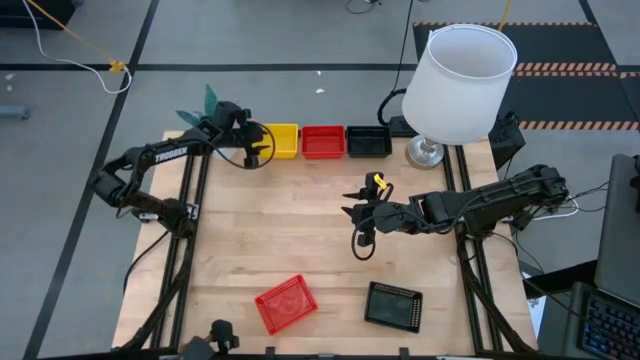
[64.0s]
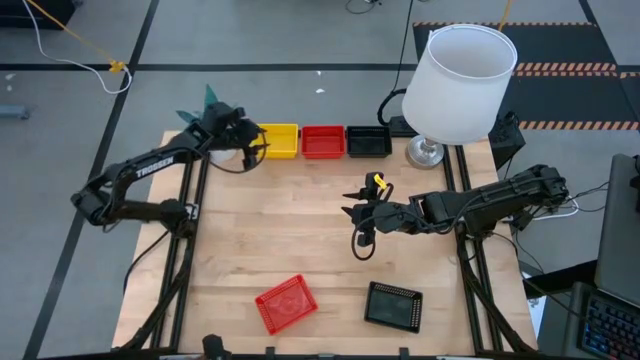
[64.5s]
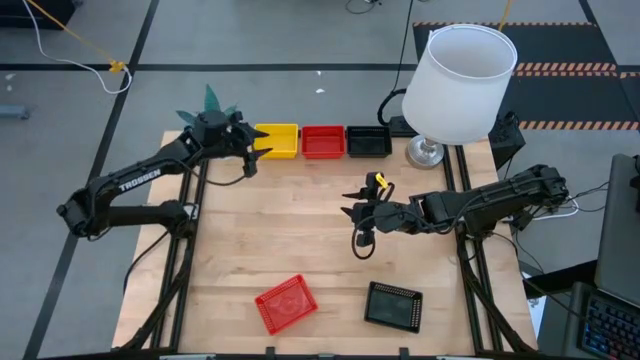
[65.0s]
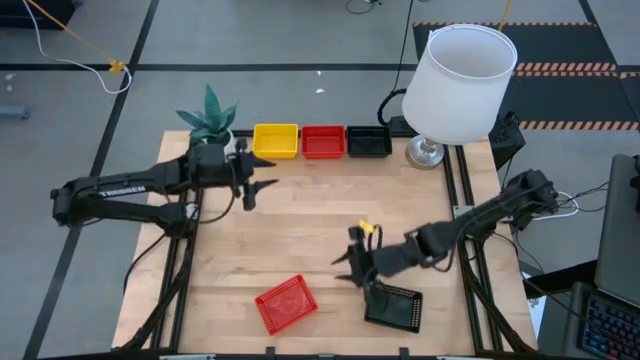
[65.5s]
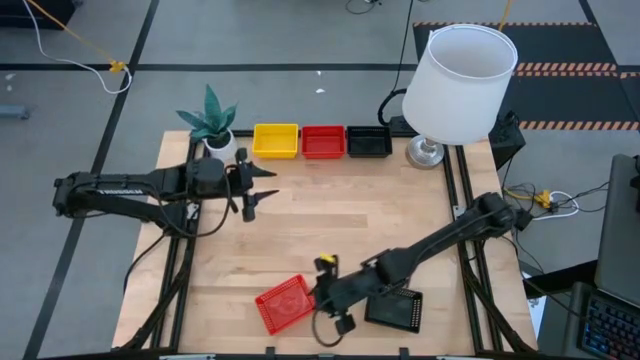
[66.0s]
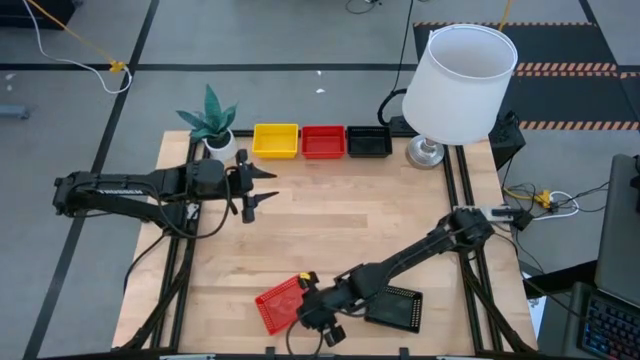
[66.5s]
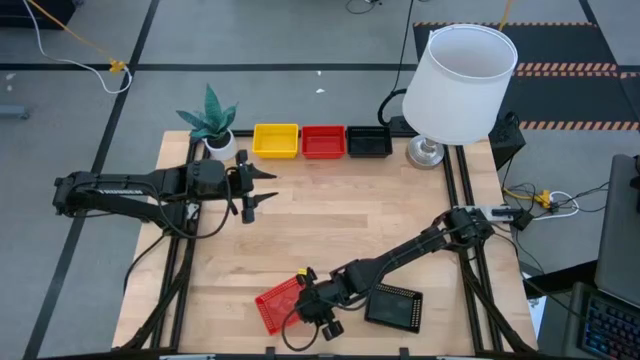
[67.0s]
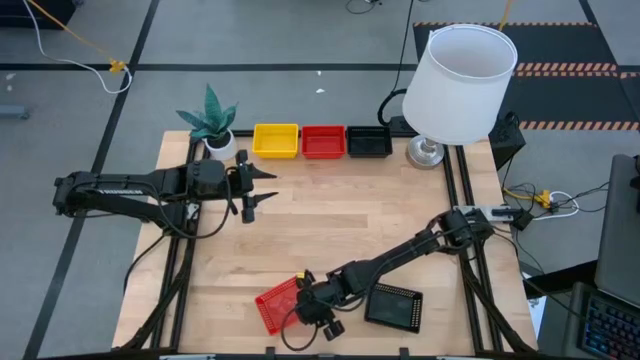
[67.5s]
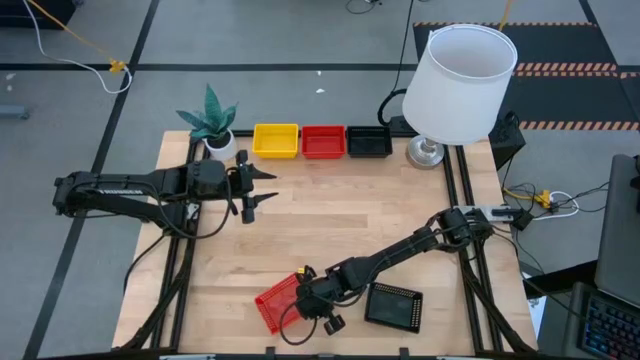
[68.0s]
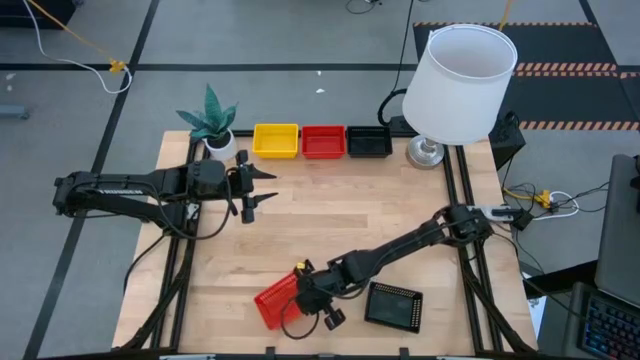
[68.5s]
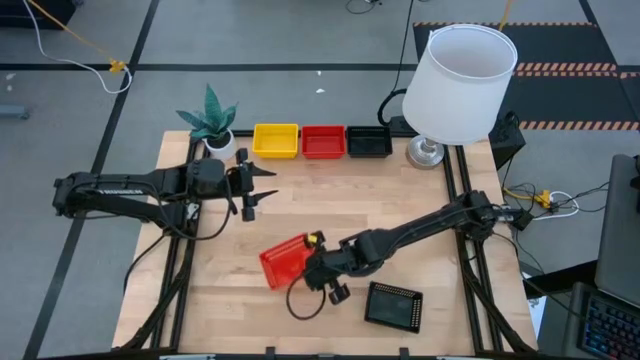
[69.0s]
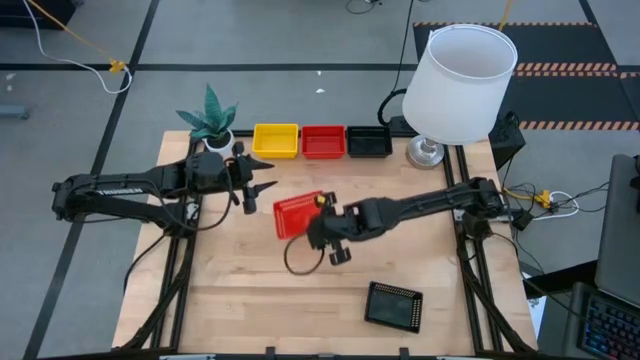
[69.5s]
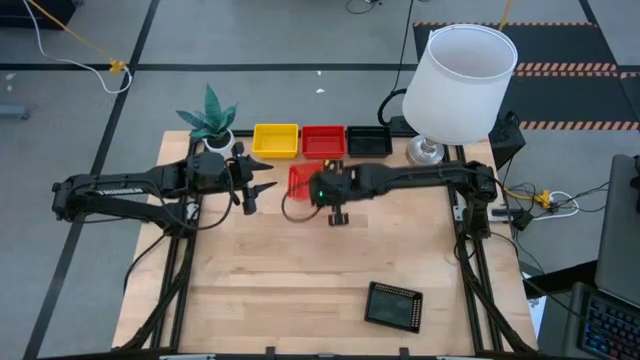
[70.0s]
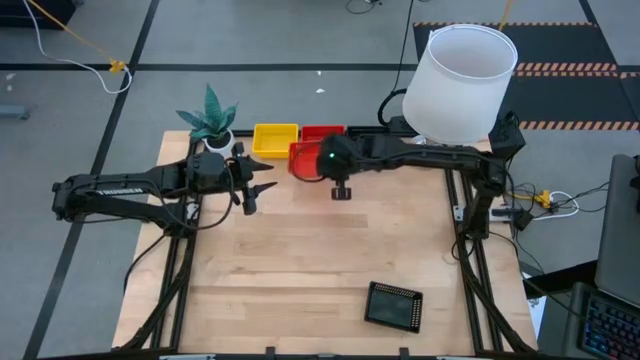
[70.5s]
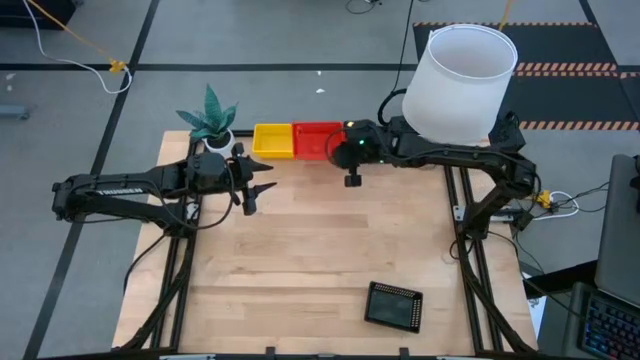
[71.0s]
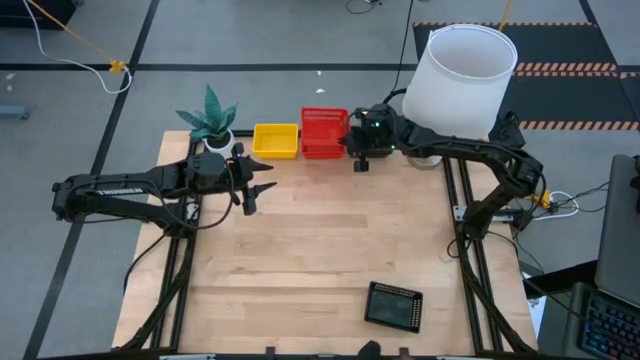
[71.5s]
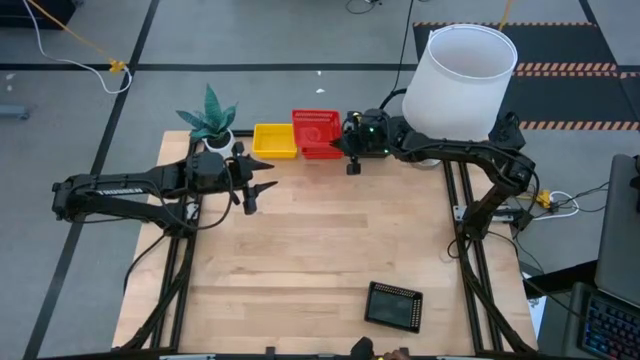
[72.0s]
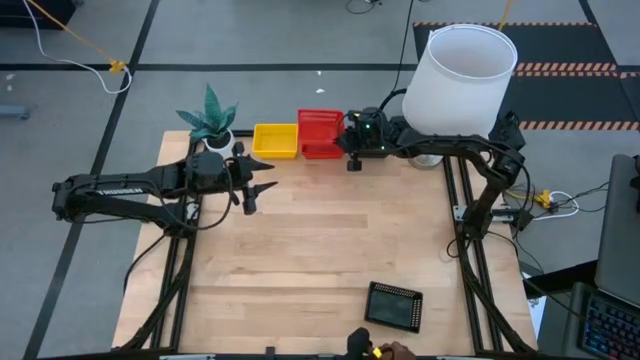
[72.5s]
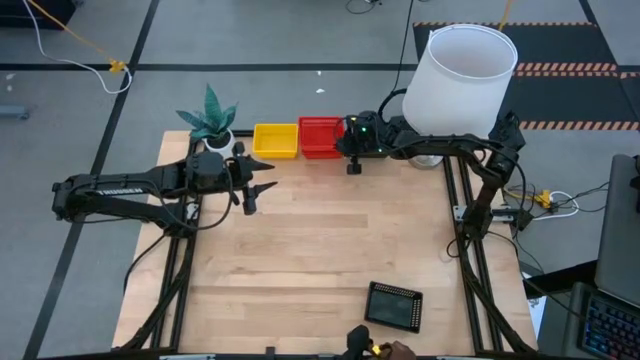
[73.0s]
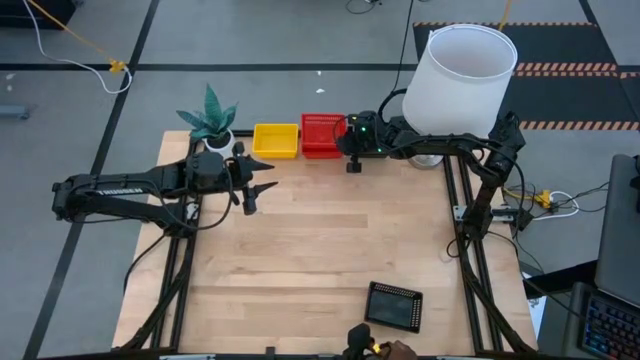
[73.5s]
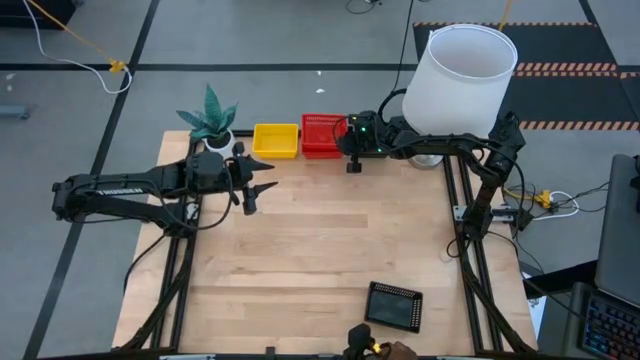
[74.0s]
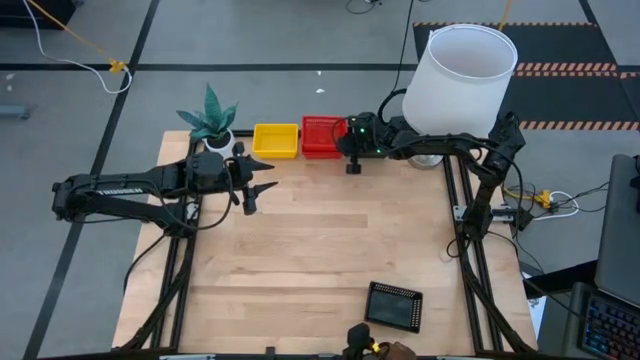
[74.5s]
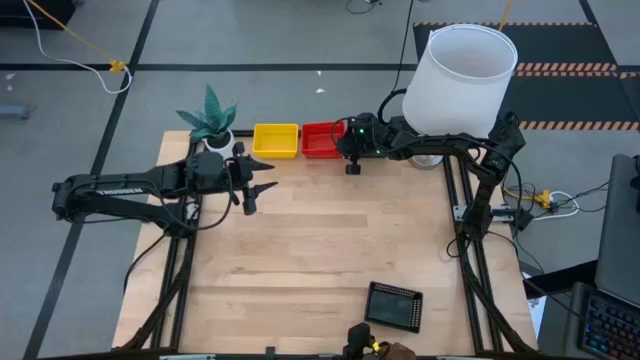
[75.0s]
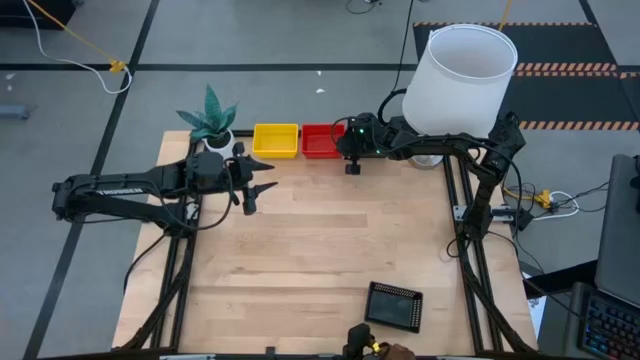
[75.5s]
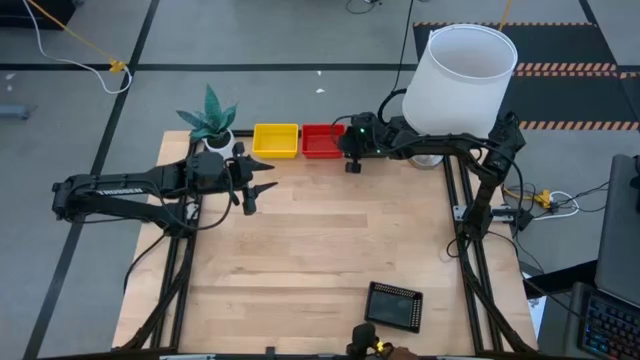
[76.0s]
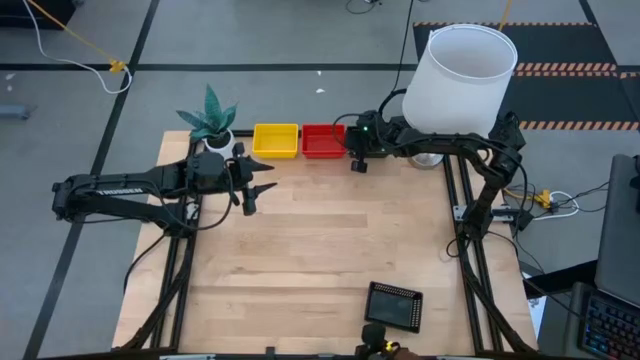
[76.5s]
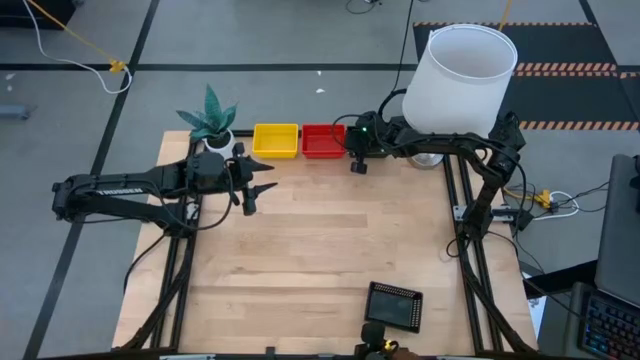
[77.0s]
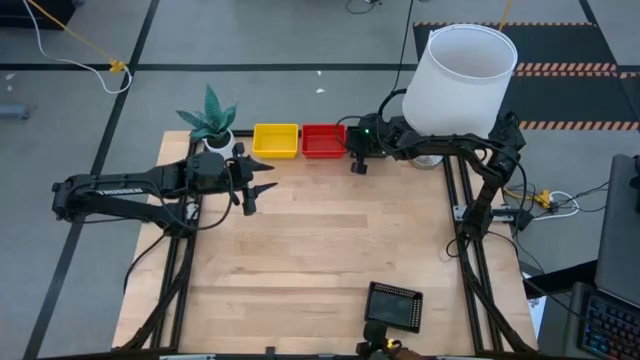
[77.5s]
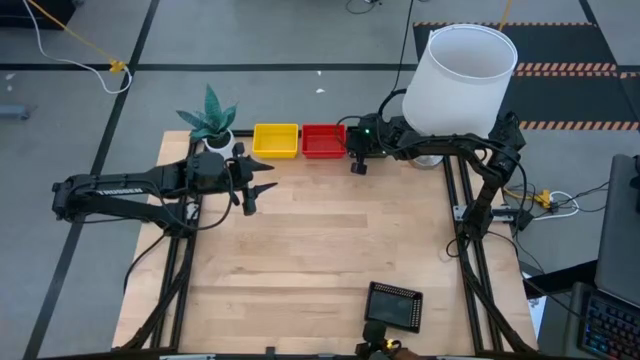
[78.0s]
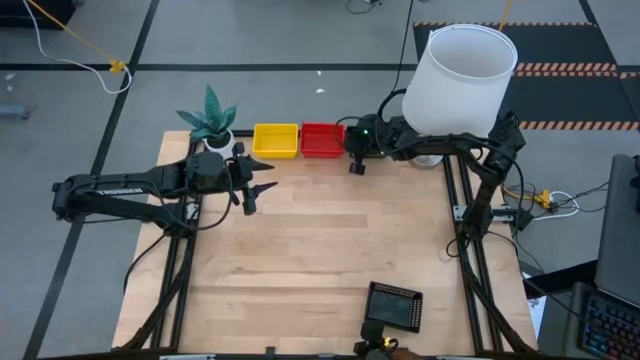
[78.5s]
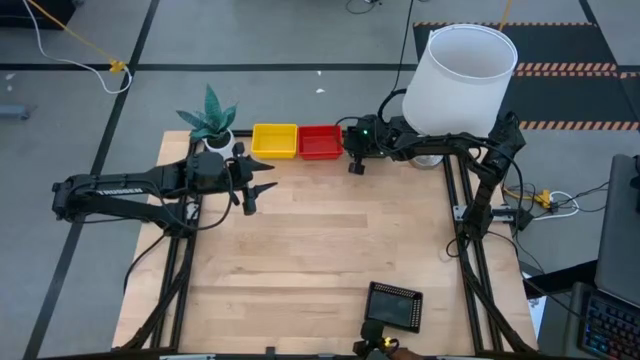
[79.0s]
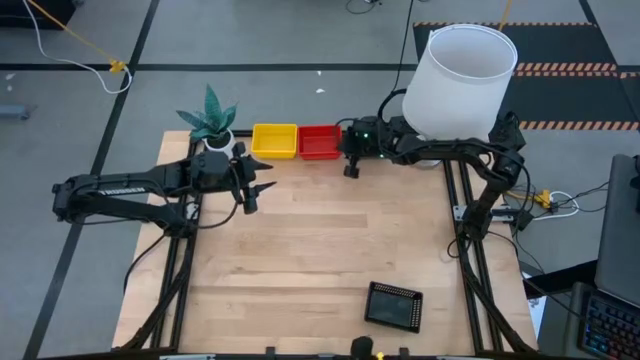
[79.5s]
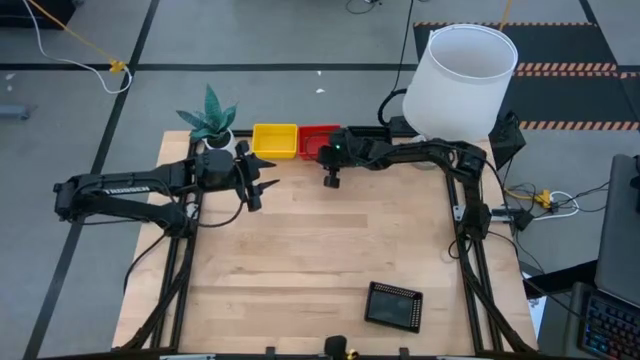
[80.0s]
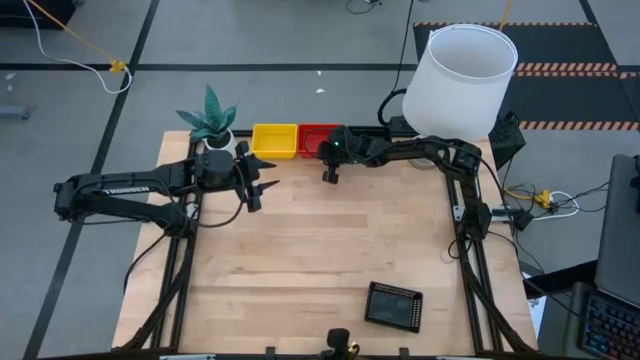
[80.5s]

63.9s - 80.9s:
Stack the bottom red bin on the top stacked red bins
